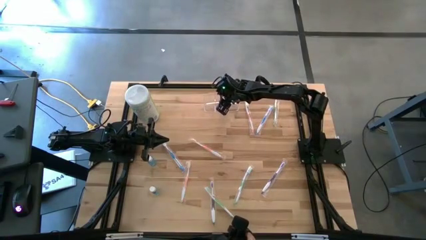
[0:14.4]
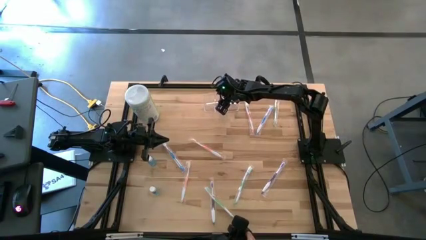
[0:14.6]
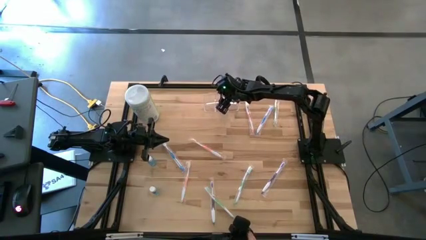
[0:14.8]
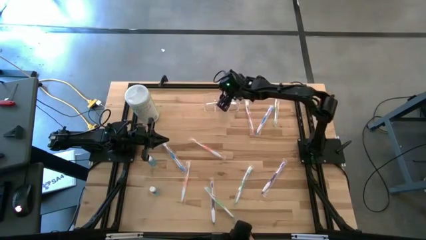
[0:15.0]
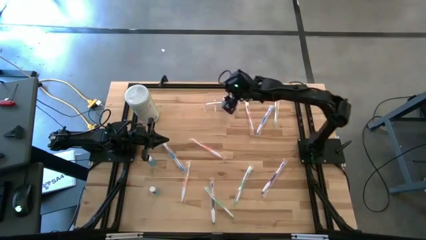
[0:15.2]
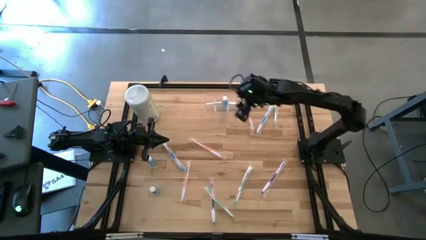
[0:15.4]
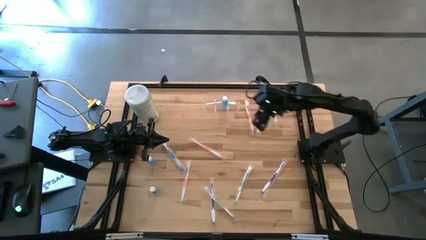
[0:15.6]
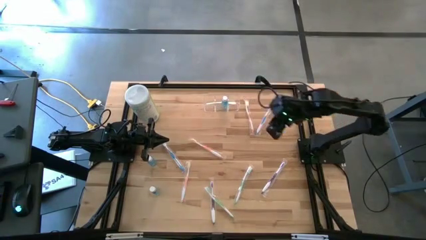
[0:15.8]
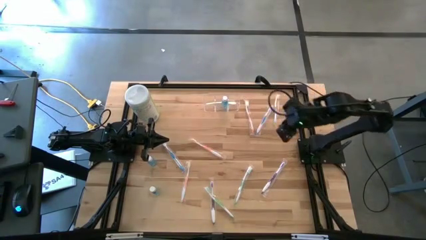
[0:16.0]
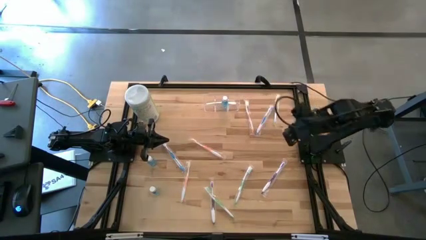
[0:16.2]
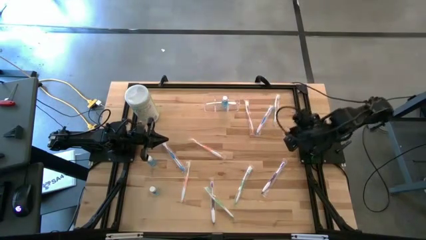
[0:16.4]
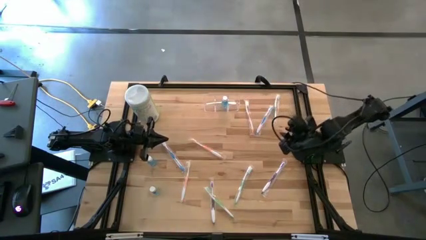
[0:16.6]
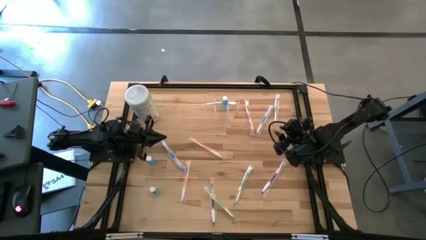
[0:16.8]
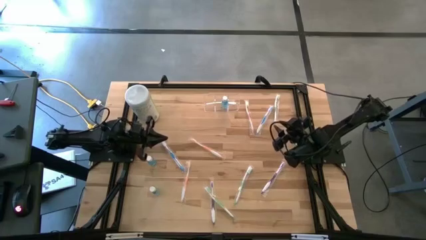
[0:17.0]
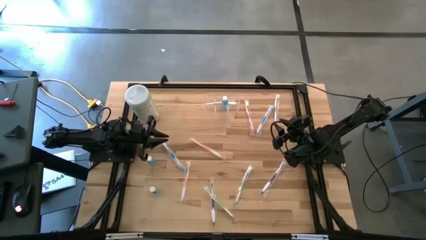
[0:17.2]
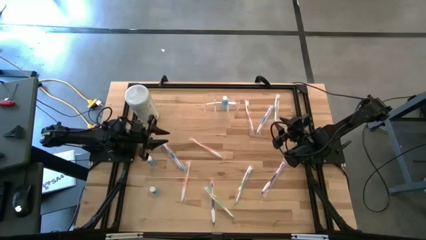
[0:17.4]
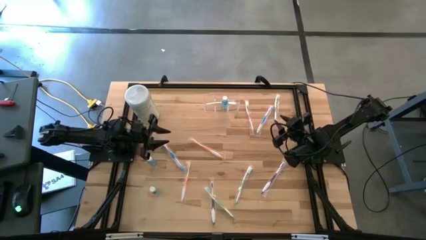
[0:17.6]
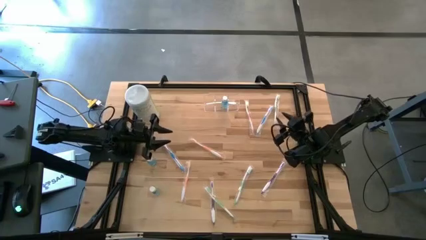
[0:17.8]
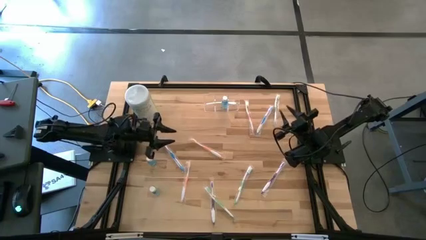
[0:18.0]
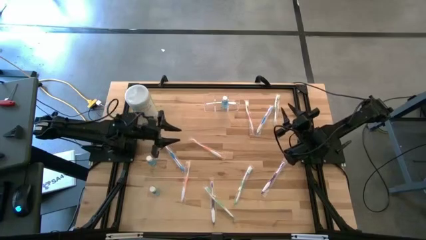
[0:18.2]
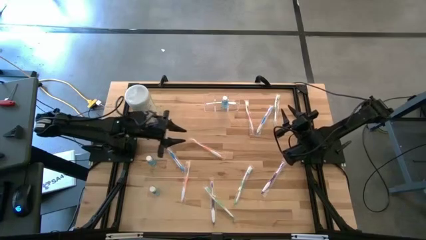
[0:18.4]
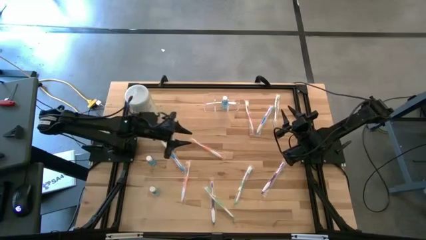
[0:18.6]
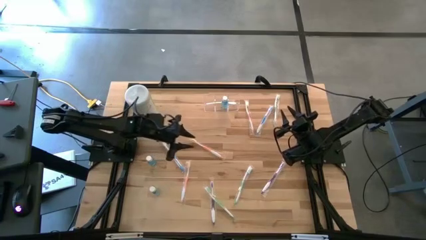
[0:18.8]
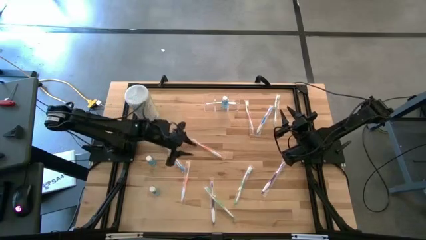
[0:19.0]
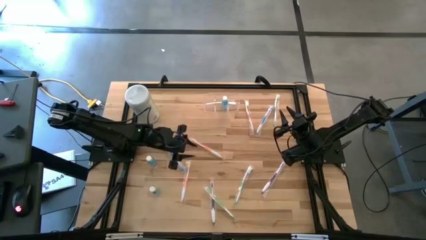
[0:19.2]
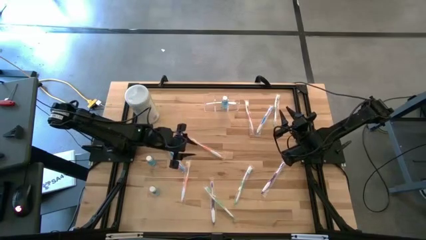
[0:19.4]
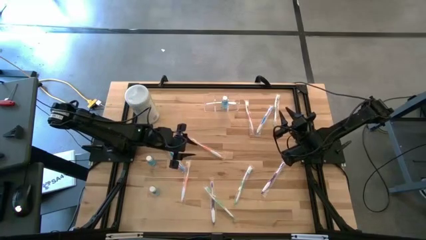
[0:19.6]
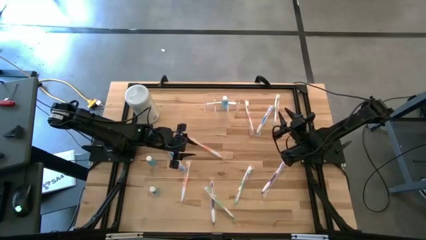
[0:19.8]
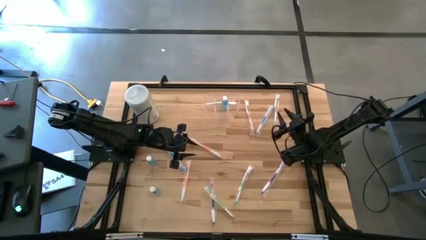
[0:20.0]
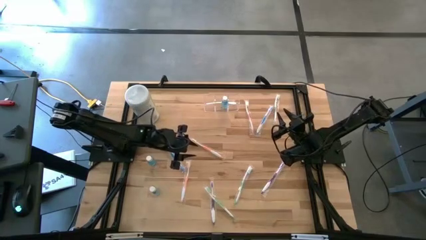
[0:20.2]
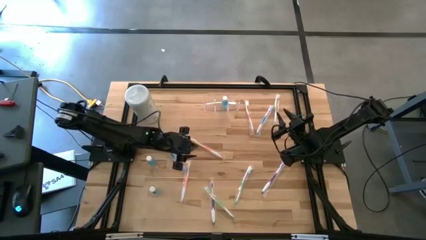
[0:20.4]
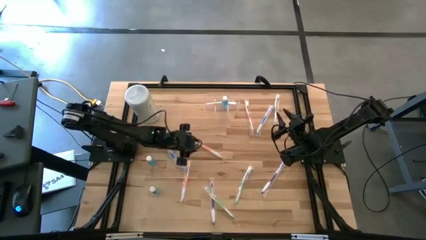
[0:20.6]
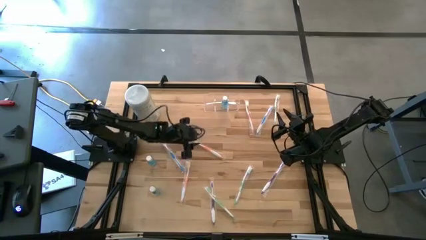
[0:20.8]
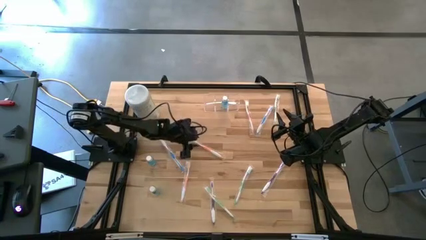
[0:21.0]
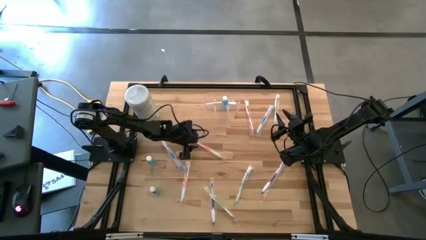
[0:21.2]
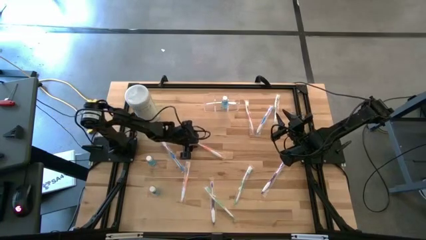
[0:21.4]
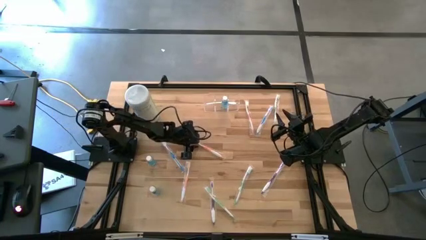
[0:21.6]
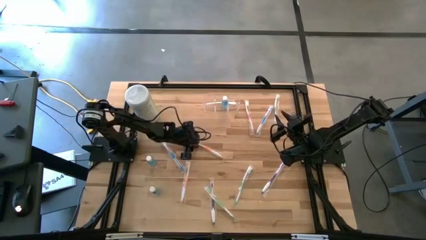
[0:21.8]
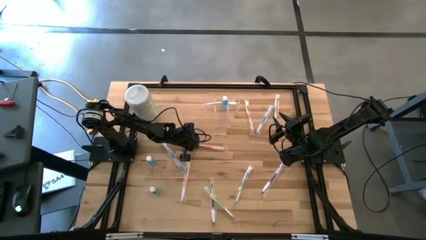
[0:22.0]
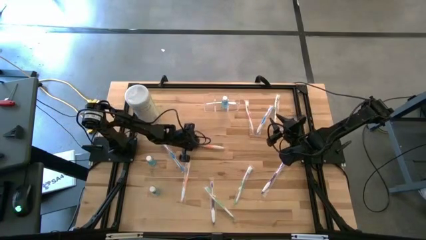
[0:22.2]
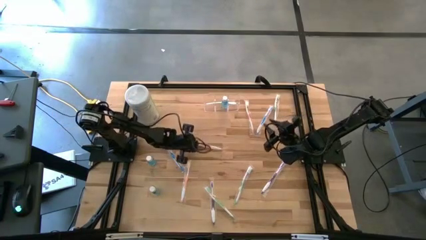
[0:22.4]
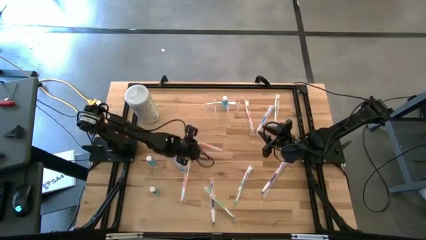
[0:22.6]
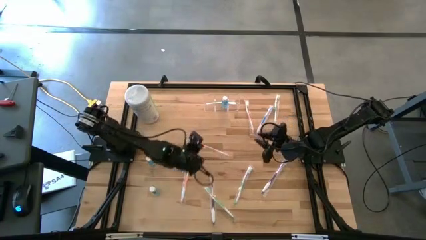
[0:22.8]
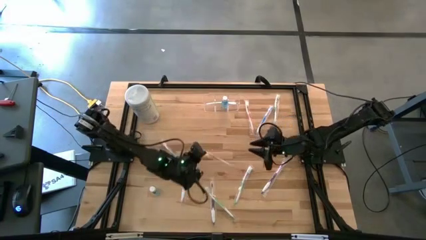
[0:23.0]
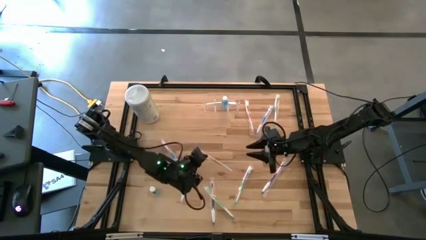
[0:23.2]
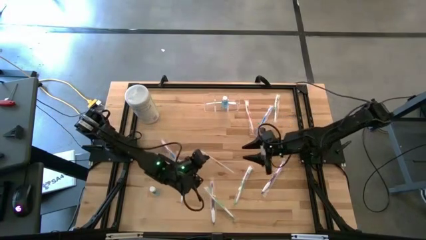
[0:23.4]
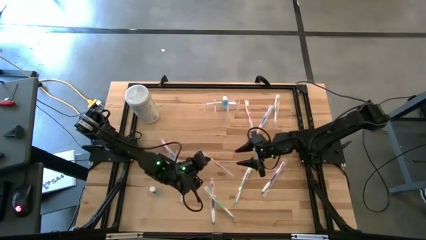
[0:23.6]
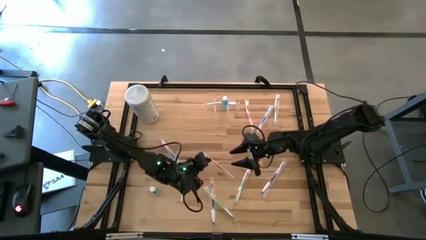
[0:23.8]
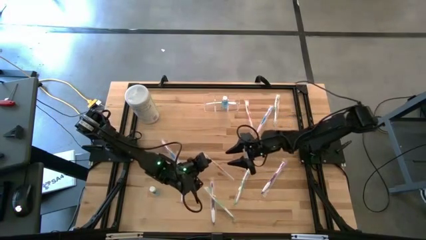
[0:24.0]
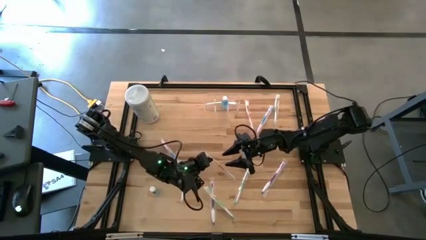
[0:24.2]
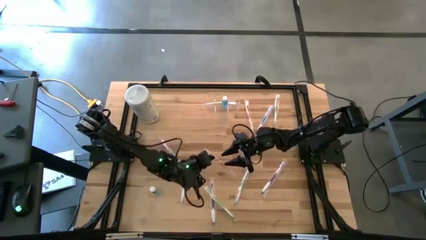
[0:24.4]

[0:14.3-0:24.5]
Task: Pick & Place toothbrushing station
Put the middle orange toothbrush into the transparent organizer
